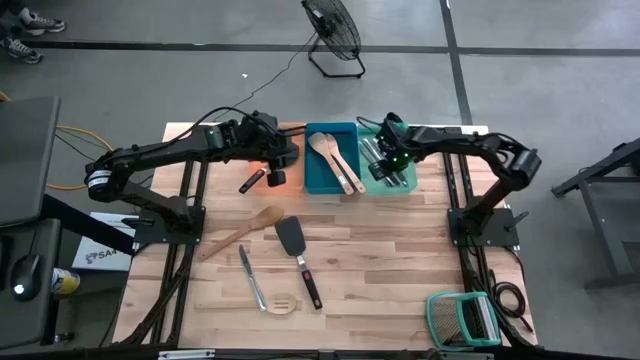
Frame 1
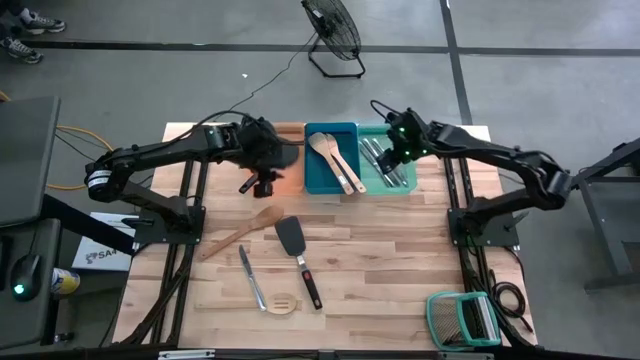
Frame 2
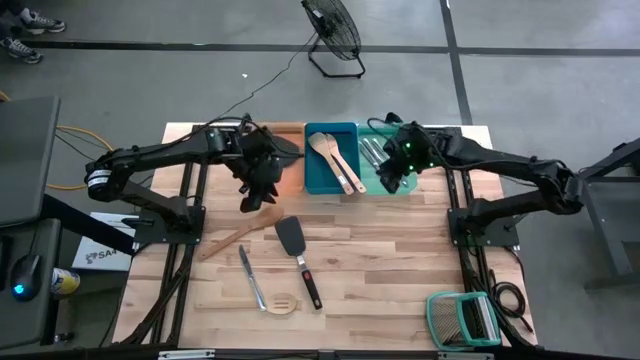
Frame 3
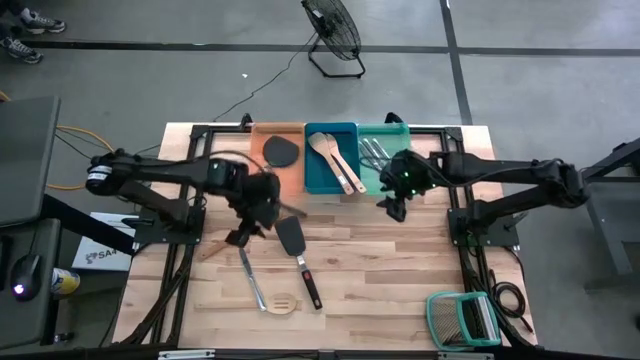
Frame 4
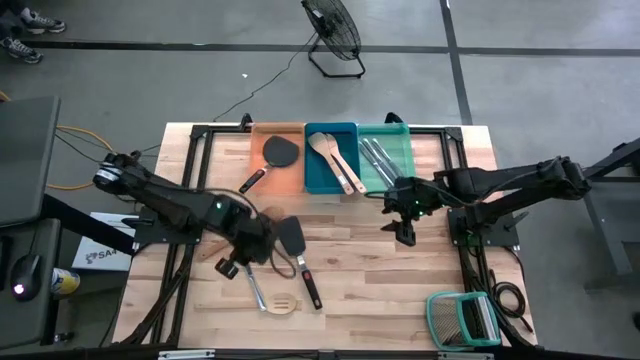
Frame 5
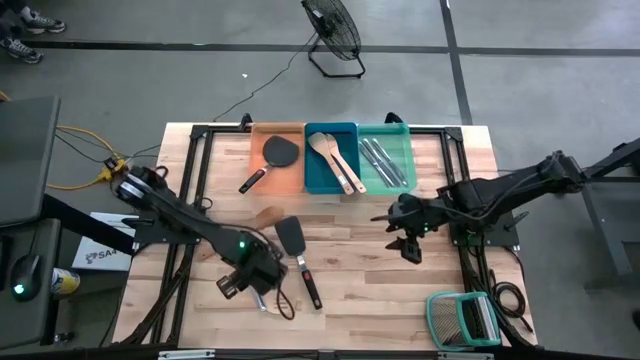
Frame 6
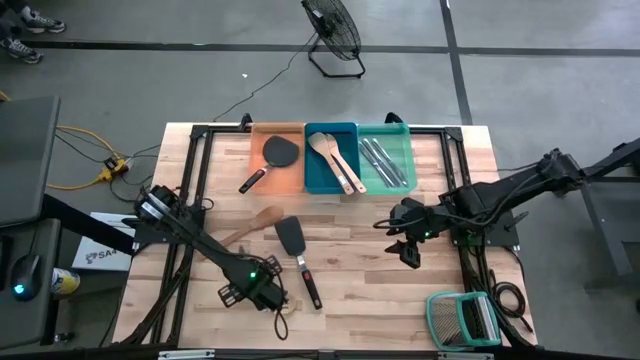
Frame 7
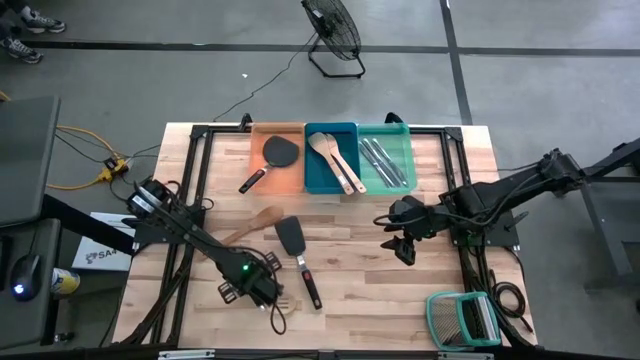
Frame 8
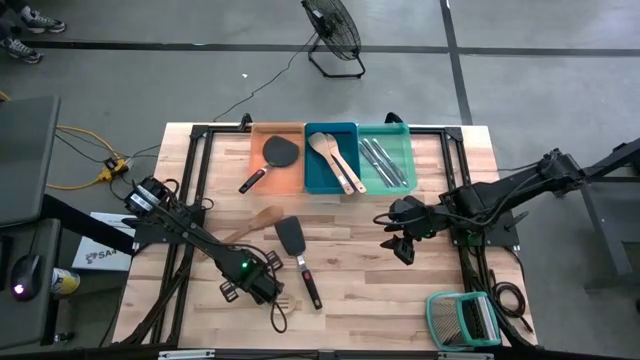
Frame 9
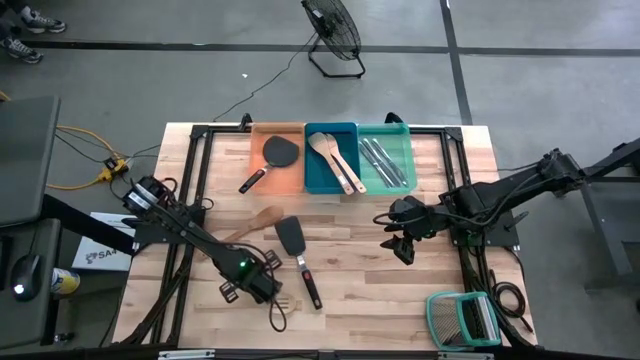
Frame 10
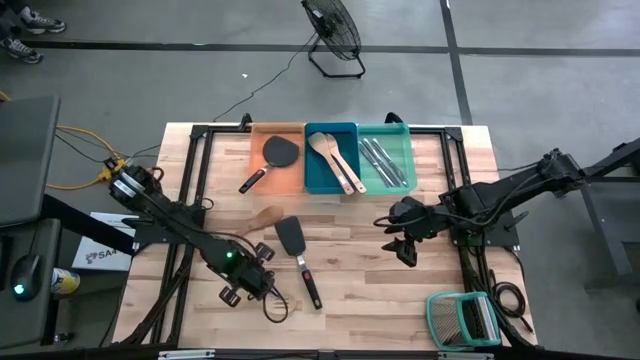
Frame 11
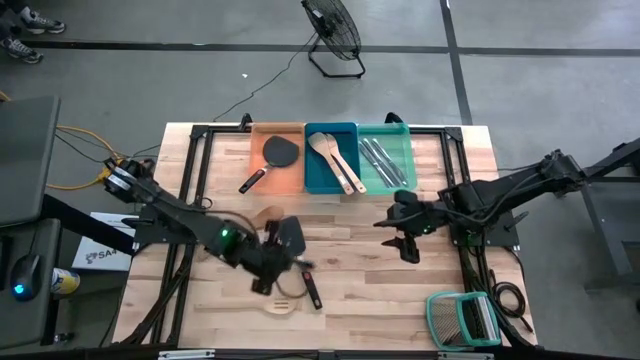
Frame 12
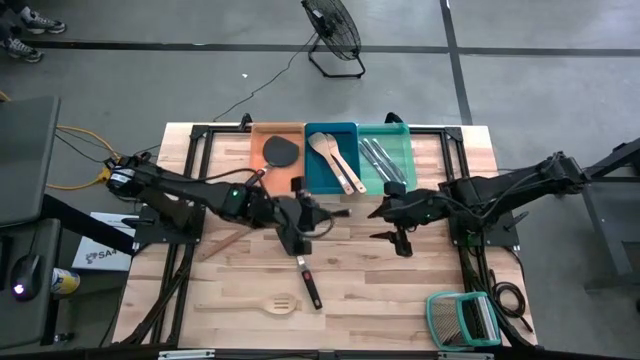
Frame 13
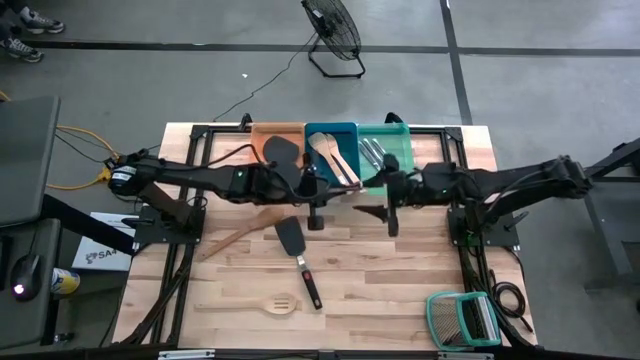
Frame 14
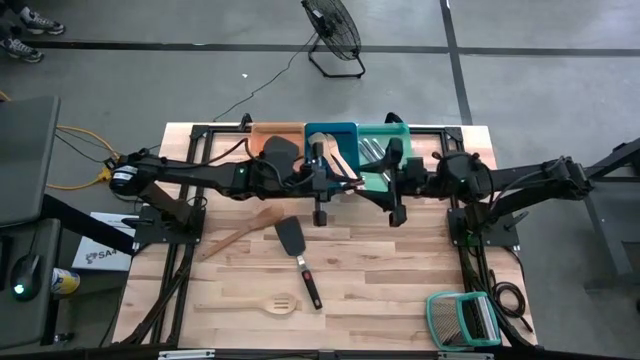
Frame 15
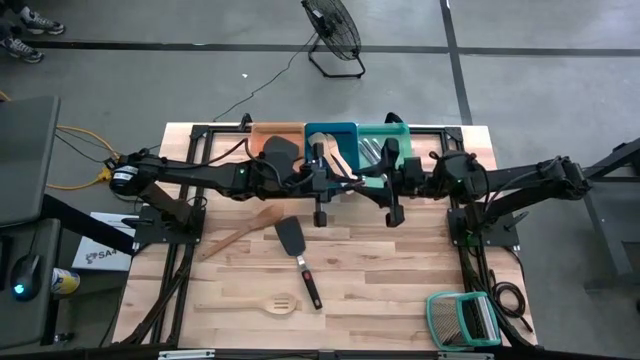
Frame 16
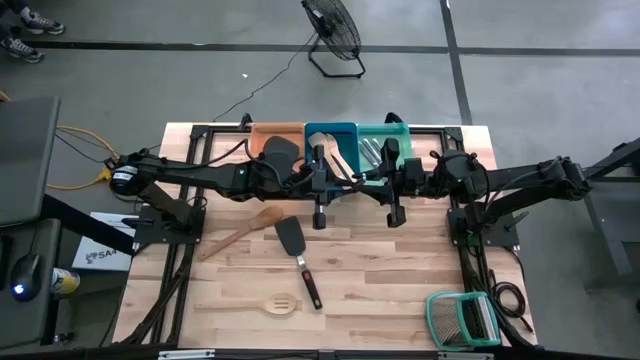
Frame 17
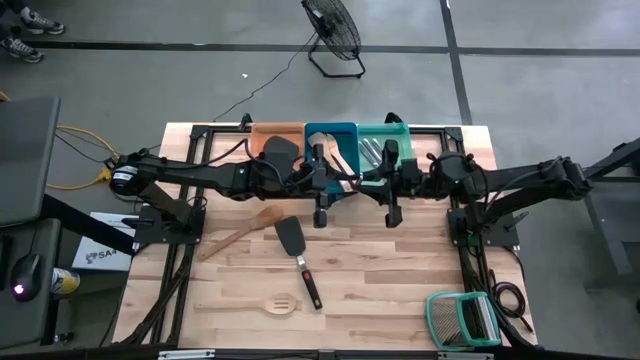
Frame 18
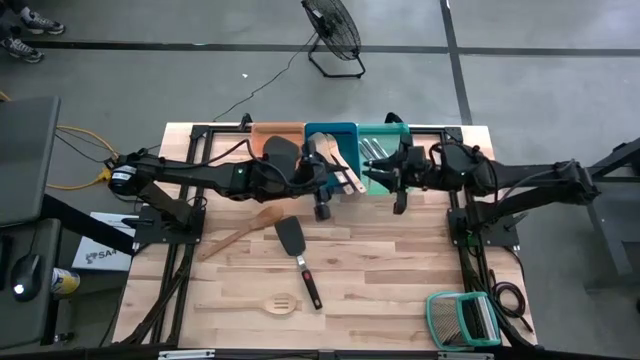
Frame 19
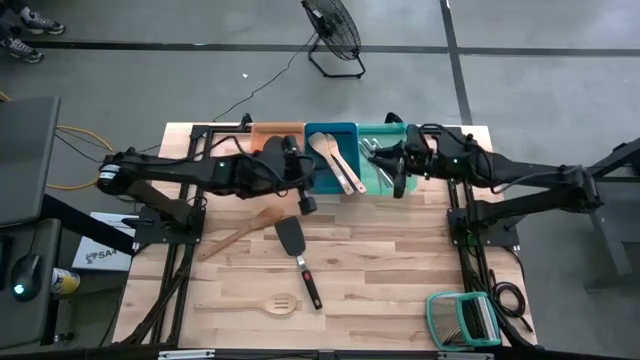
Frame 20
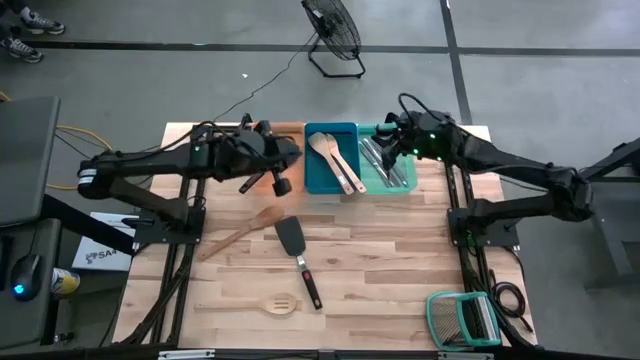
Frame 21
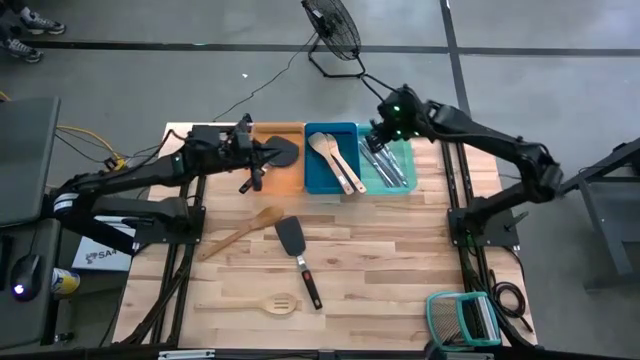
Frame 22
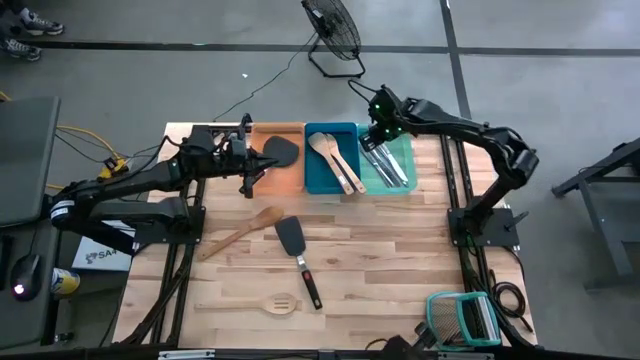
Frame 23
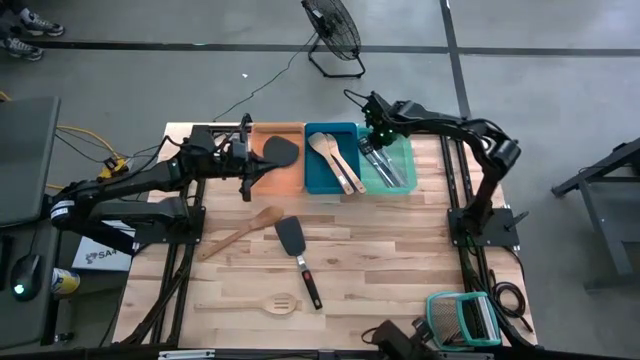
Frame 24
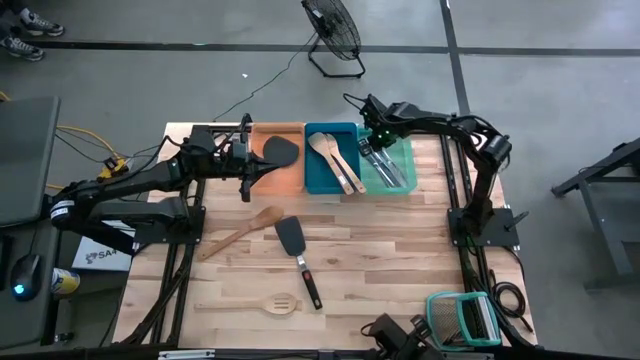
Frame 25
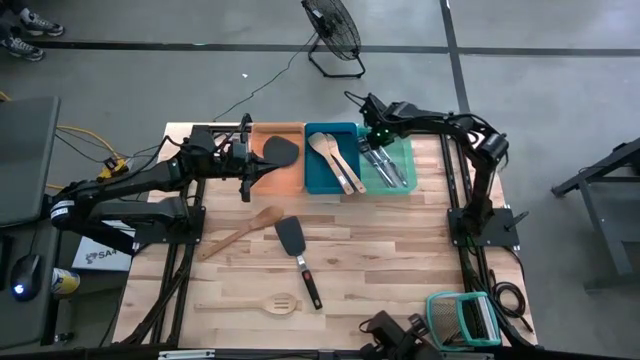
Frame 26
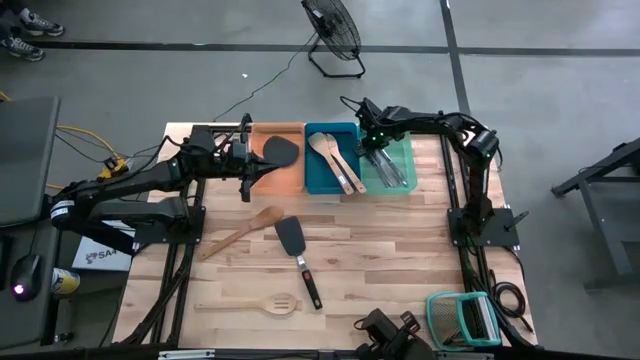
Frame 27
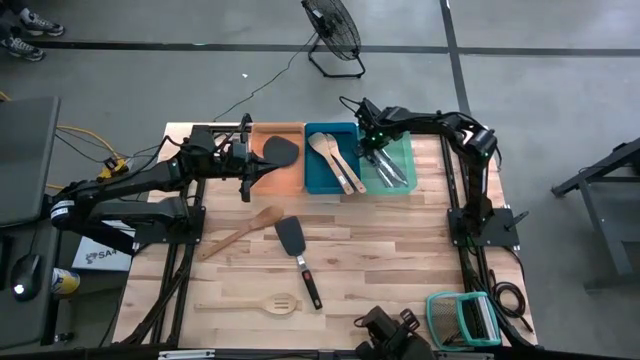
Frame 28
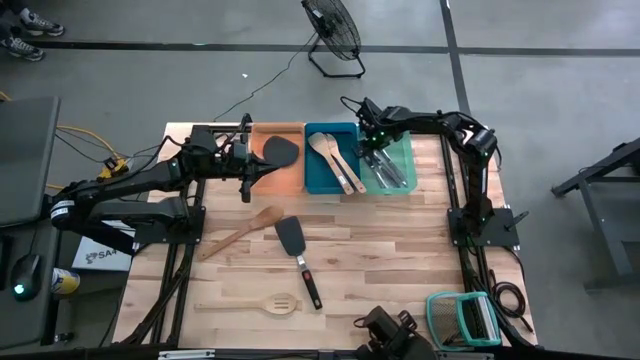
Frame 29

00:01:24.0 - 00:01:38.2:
Task: Pick & Place Kitchen Items
Put the silver knife into the green bin

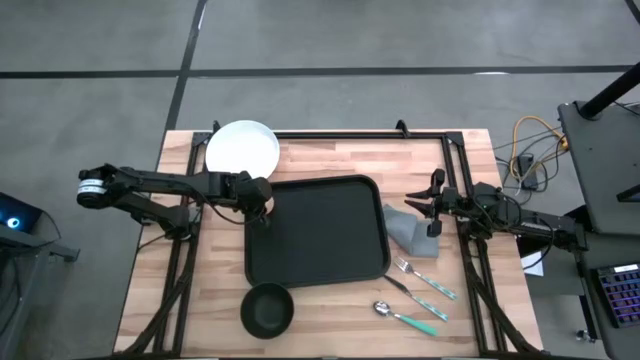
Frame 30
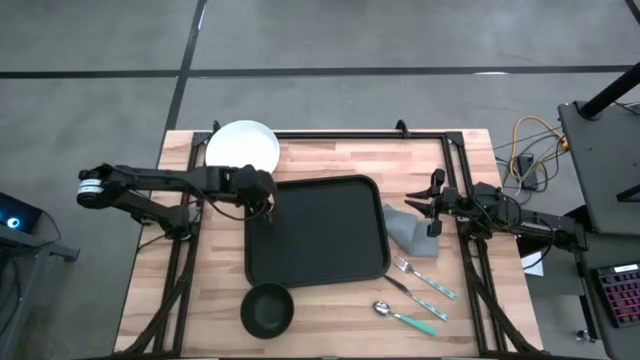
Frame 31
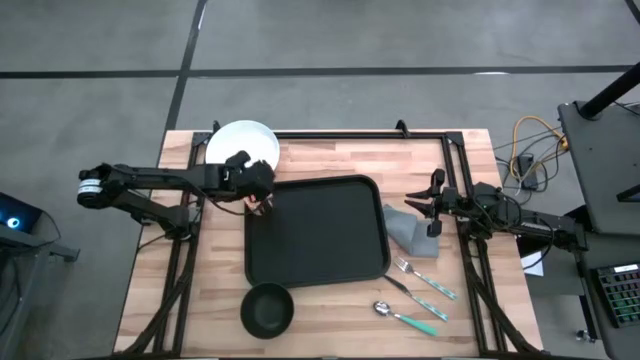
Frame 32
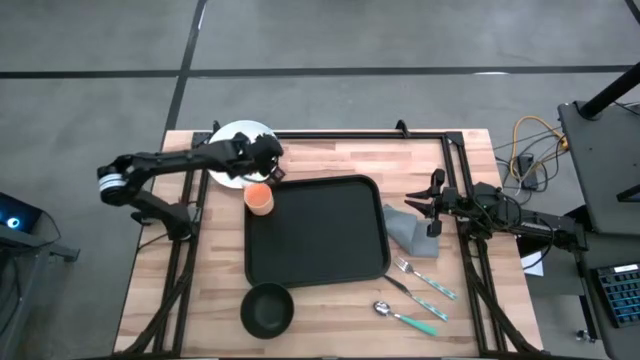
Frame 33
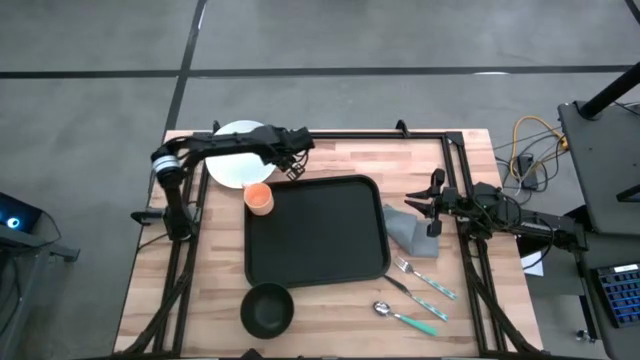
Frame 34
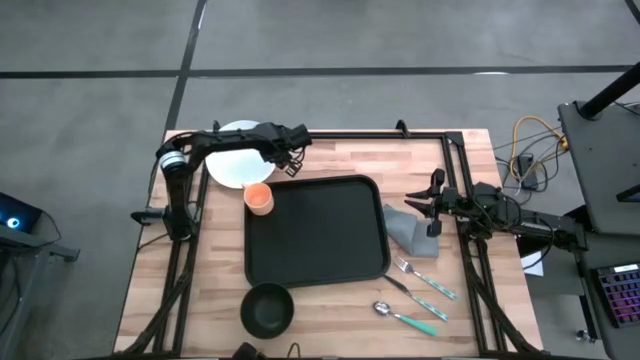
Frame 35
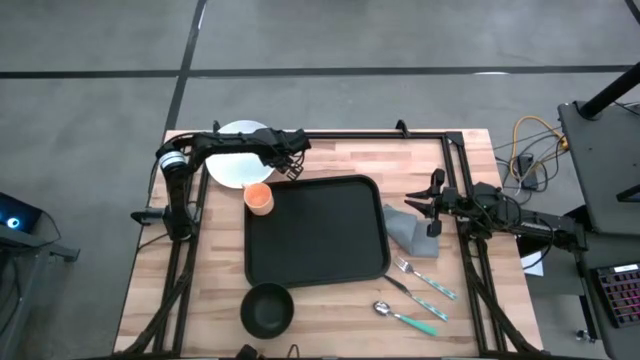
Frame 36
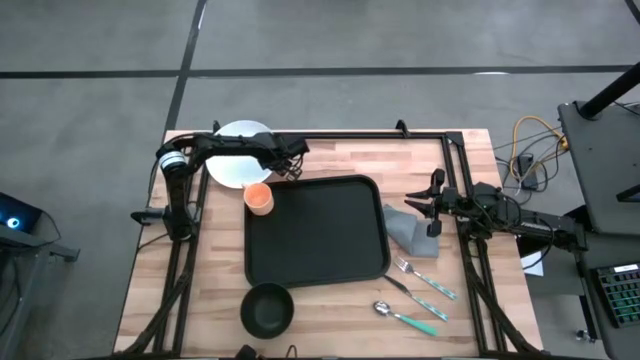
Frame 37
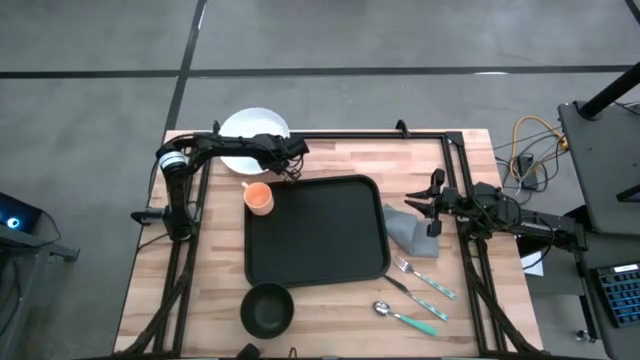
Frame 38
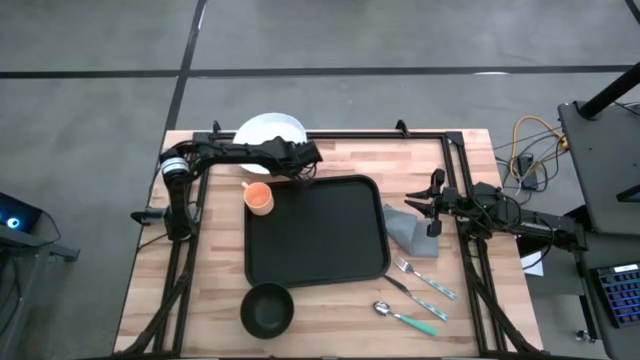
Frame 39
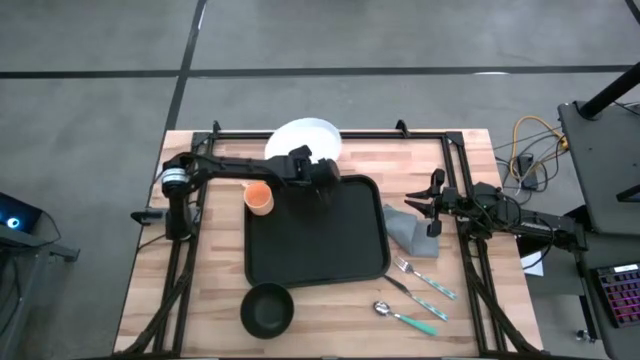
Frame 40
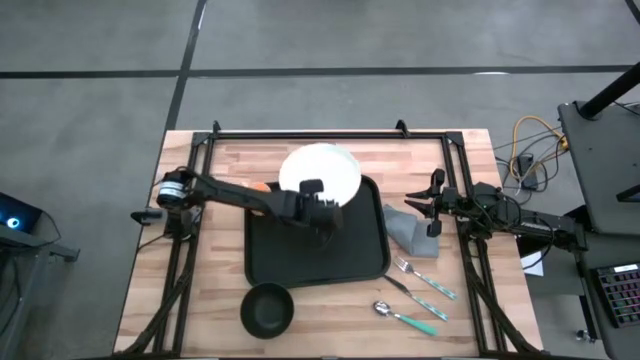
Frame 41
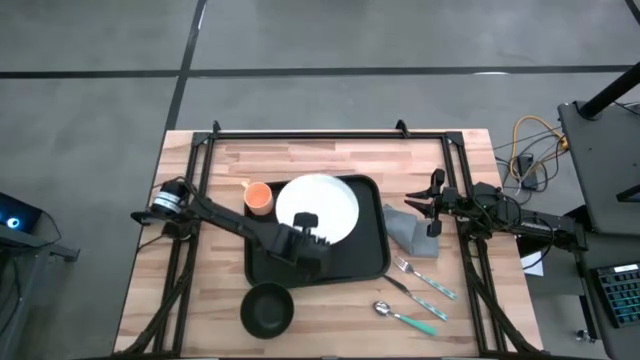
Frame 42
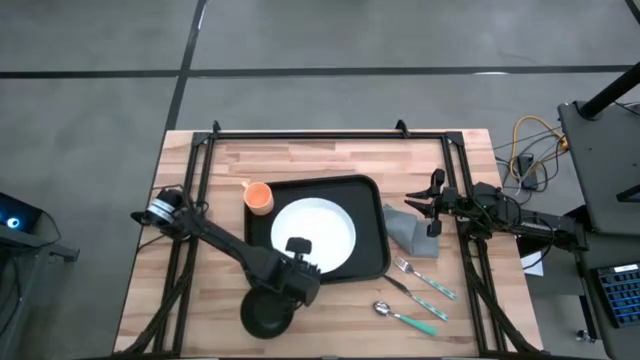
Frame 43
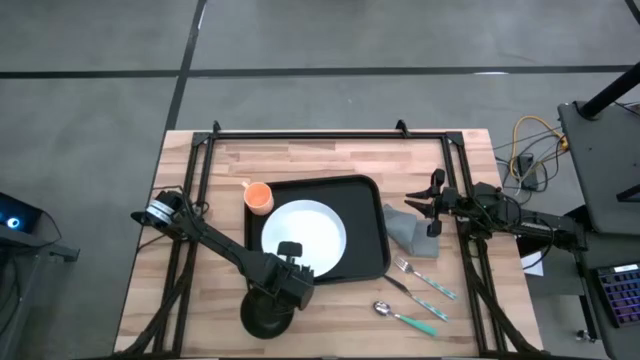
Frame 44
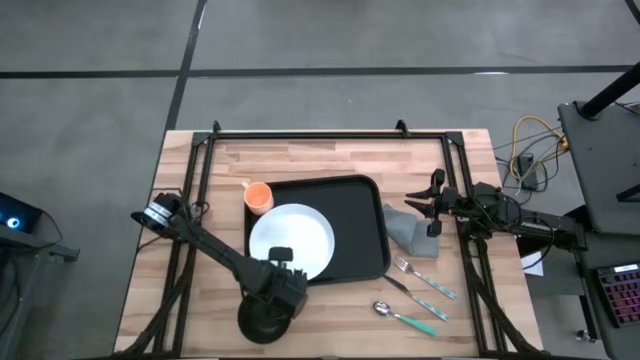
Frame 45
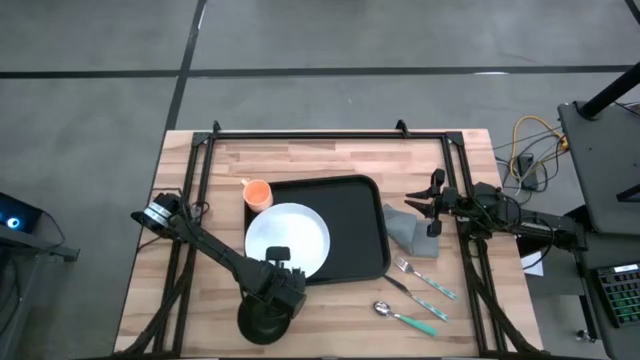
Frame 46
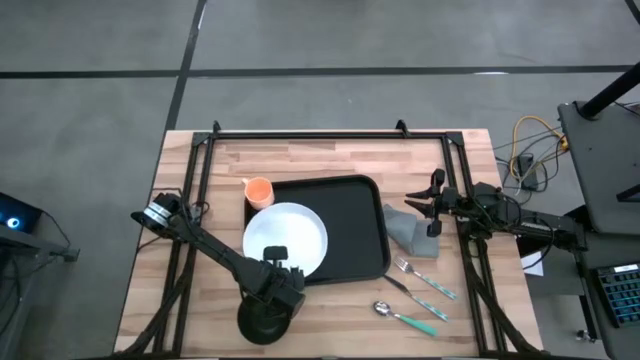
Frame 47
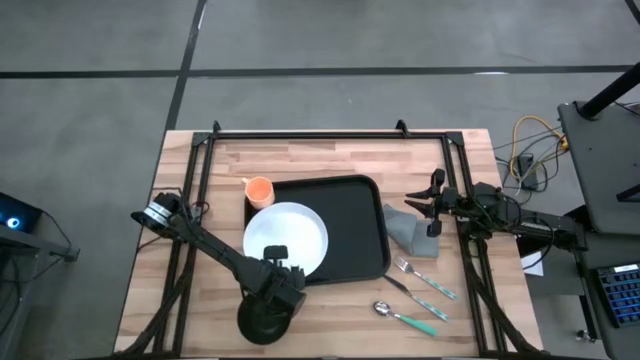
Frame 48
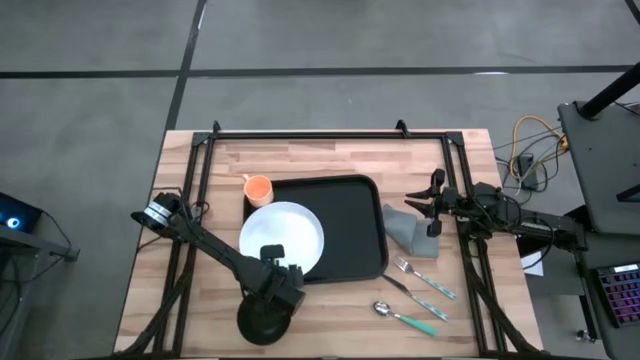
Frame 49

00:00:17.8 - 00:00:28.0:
Task: Set up tray
Put the white plate to the bottom of orange mug on the black serving tray
